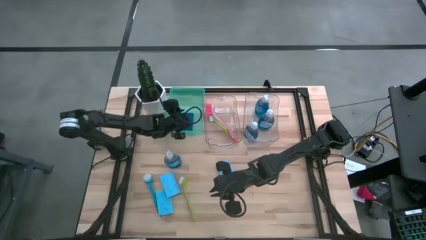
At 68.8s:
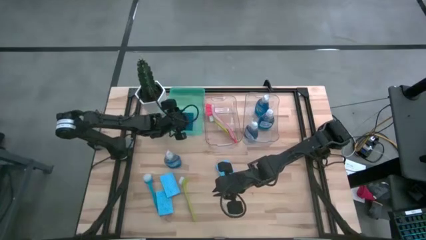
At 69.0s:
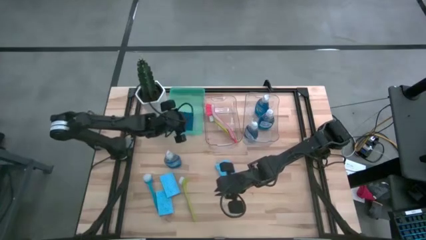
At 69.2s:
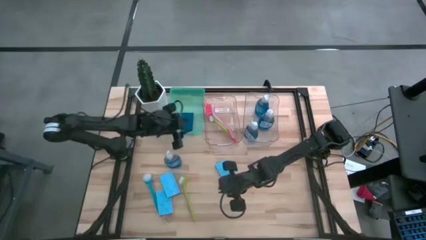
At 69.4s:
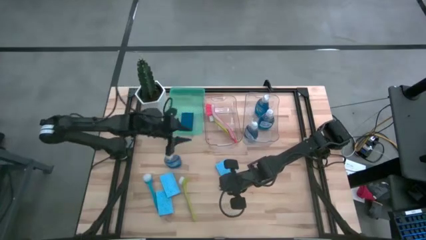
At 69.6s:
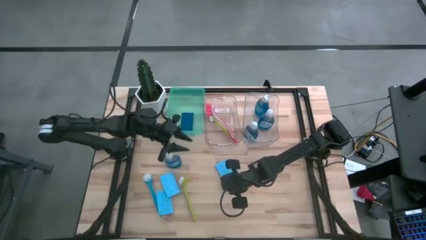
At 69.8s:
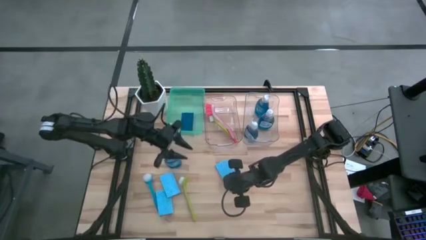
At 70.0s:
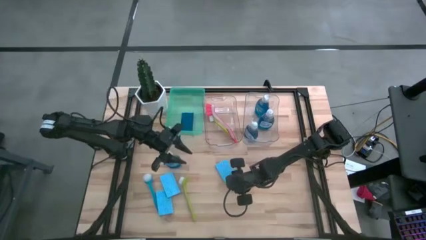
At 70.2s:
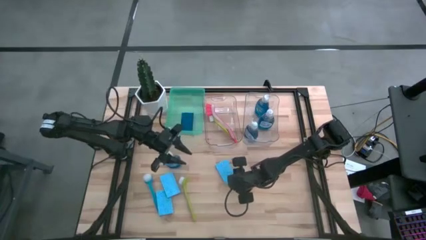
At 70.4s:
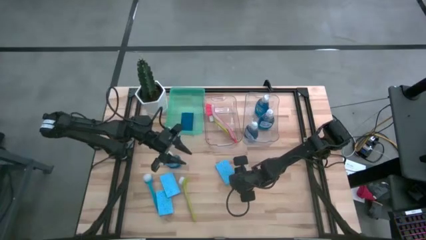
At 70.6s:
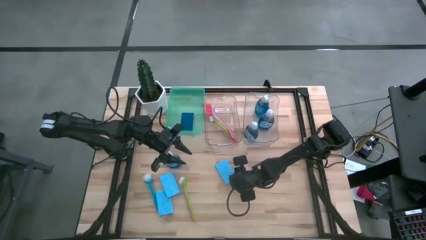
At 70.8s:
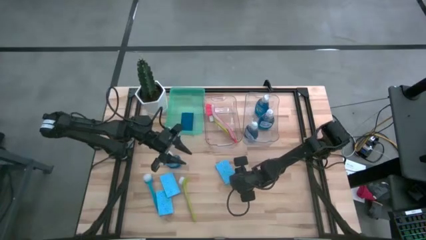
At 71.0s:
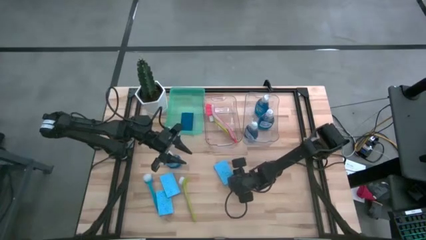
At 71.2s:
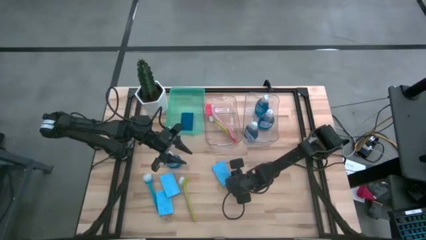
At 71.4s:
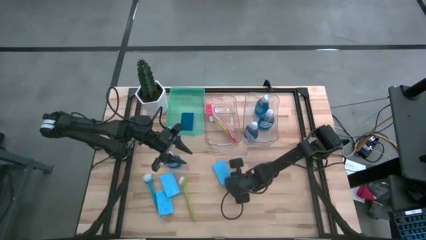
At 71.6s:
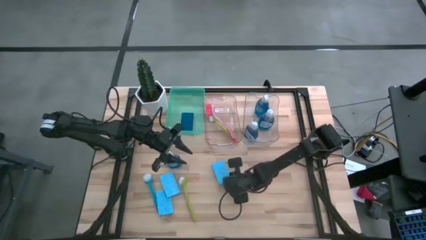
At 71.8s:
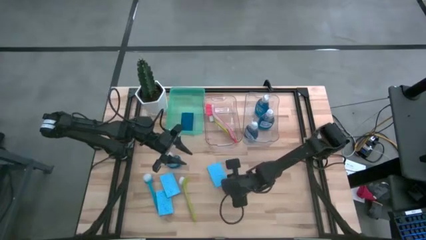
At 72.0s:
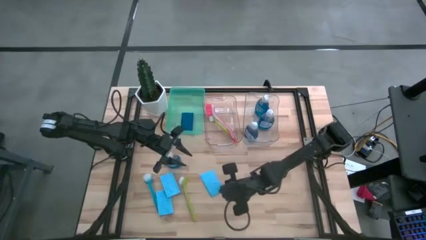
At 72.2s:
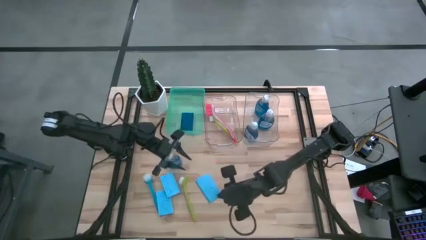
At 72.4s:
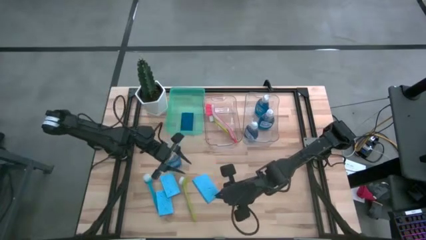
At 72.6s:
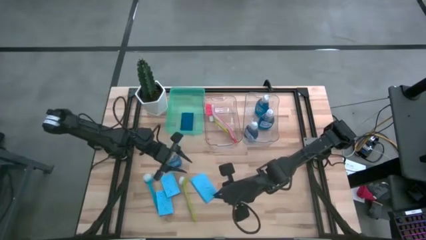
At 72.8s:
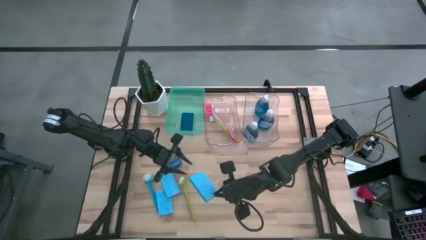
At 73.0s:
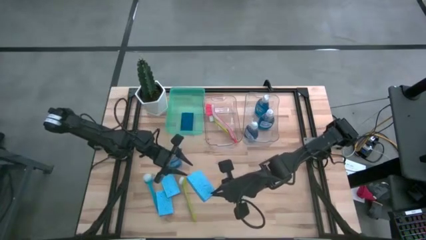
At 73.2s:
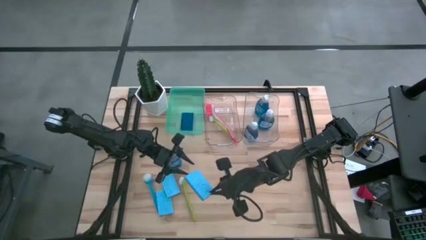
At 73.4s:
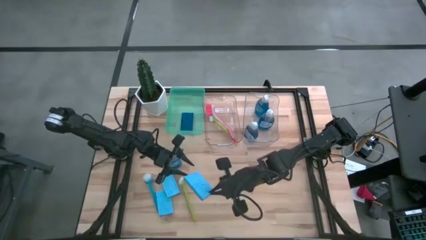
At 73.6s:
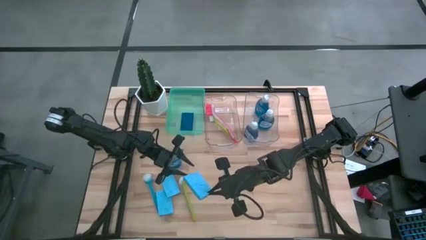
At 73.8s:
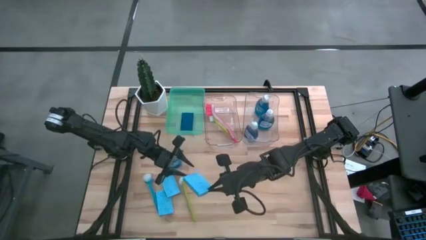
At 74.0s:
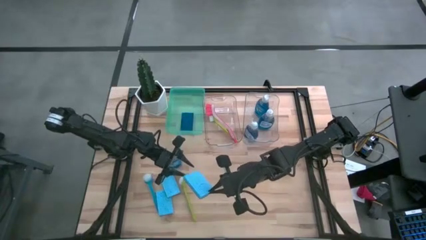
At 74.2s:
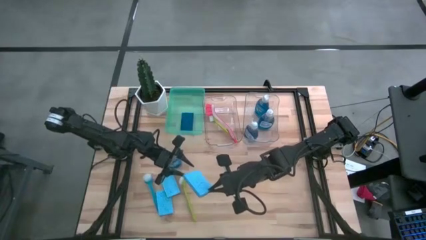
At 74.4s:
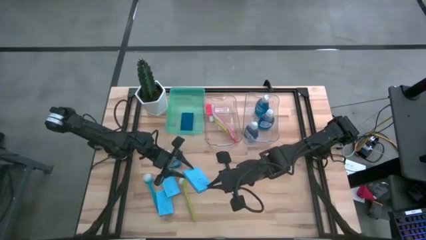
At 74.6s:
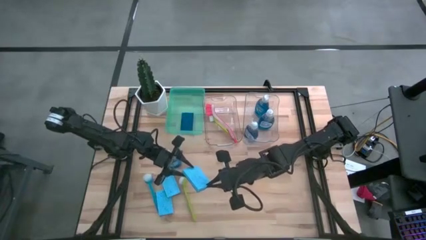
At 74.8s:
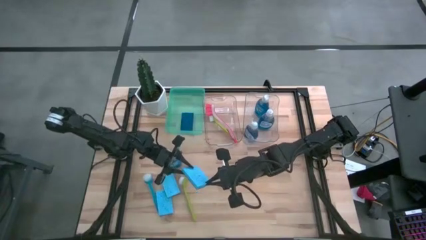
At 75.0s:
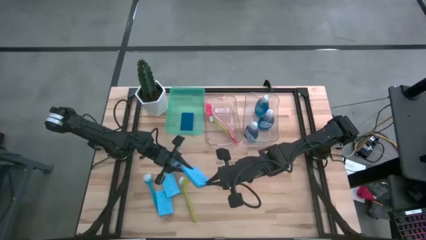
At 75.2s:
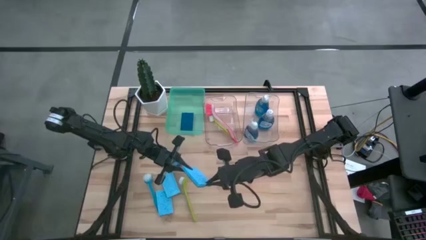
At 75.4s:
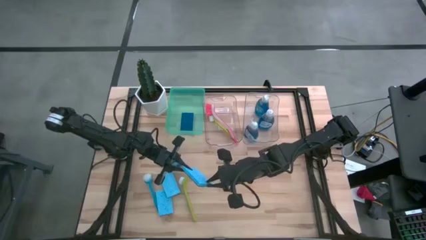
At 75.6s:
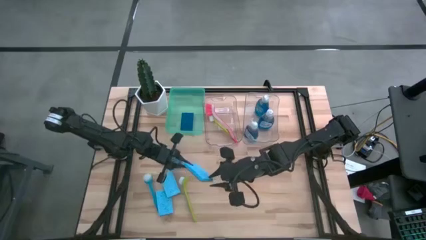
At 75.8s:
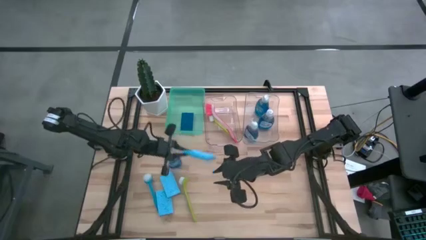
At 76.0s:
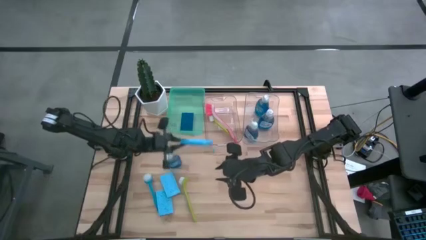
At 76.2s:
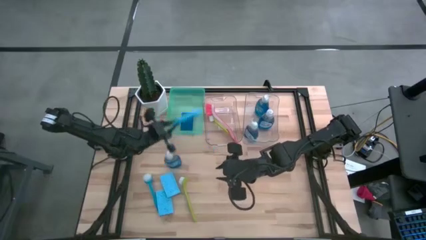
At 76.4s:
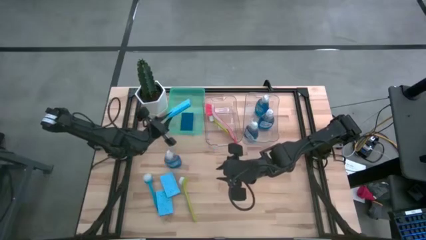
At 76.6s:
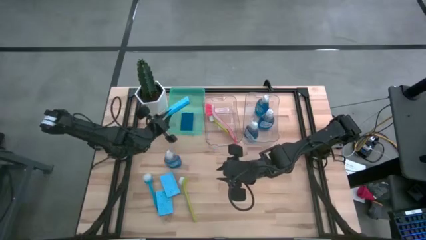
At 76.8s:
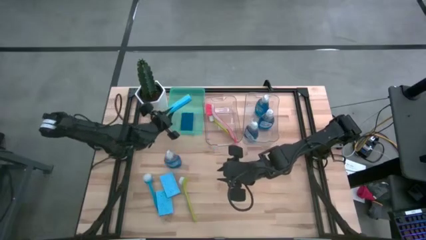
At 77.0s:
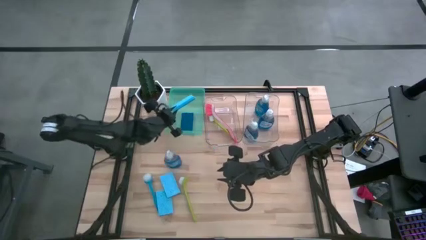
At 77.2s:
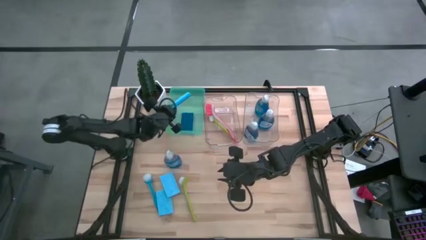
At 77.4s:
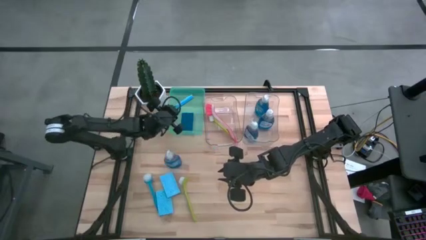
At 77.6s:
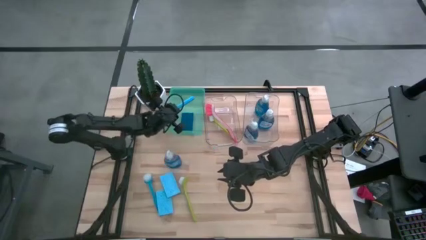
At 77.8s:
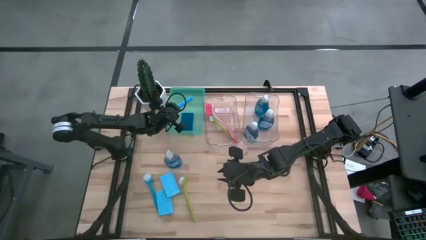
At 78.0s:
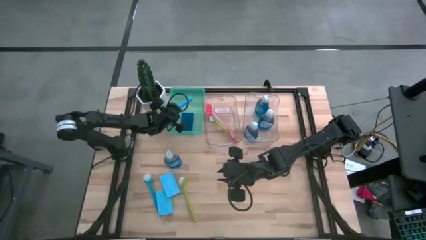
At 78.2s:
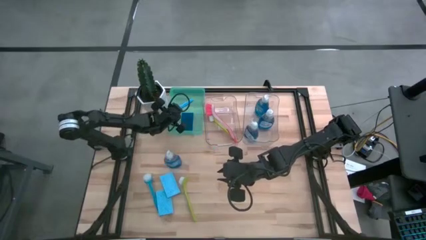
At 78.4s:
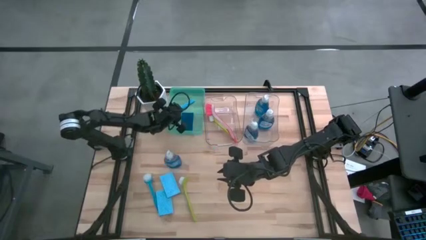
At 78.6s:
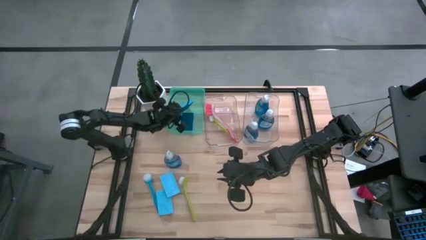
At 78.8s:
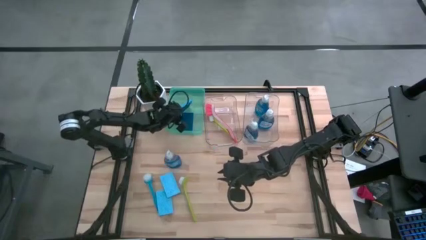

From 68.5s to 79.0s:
Task: Pick & Place Kitchen Sink Supplies
Put the blue sponge into the green bin

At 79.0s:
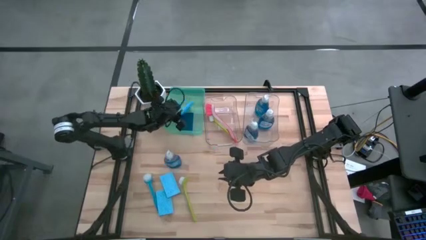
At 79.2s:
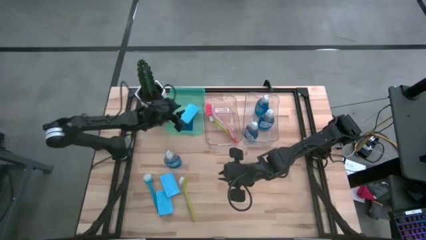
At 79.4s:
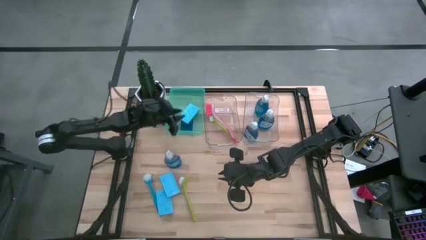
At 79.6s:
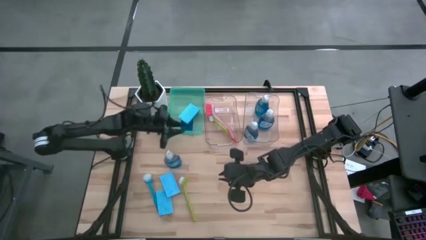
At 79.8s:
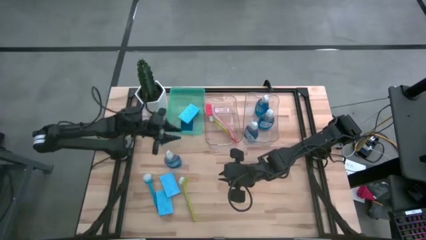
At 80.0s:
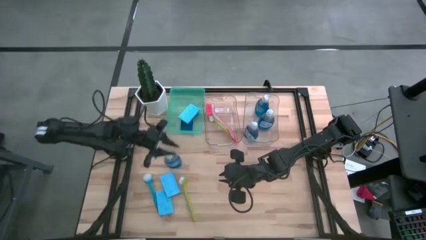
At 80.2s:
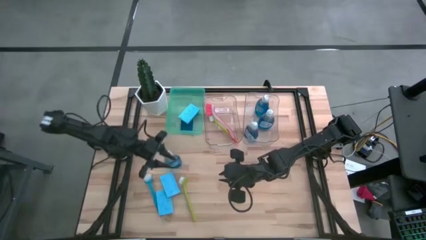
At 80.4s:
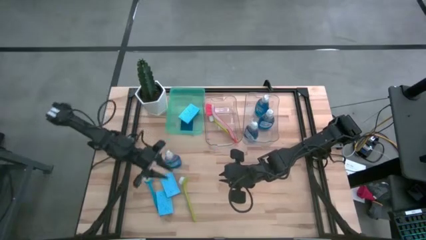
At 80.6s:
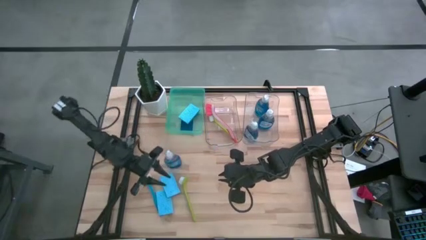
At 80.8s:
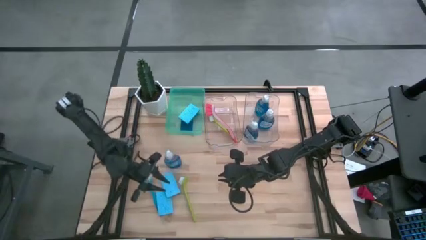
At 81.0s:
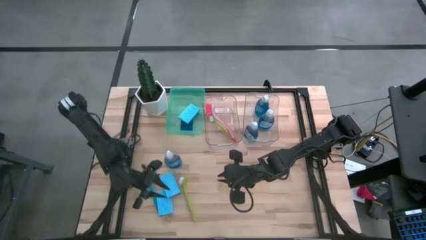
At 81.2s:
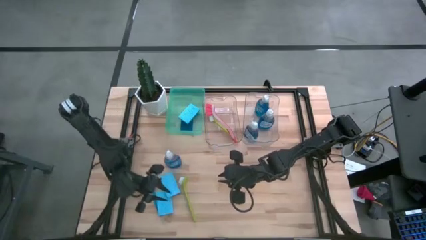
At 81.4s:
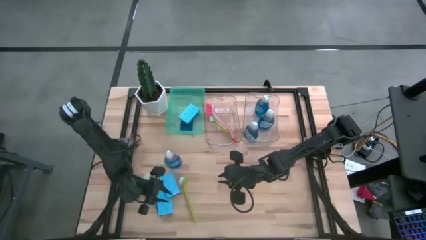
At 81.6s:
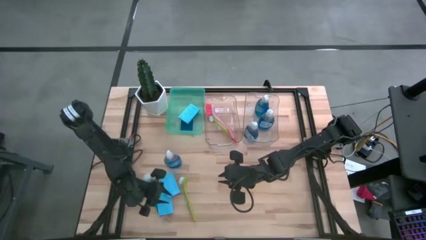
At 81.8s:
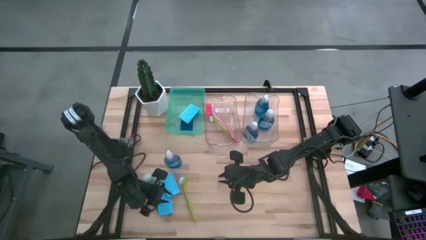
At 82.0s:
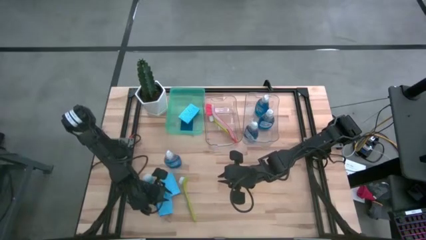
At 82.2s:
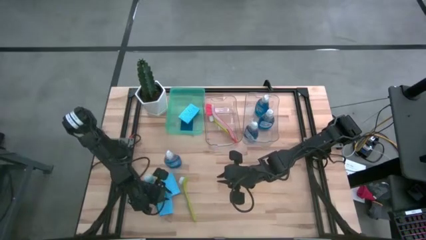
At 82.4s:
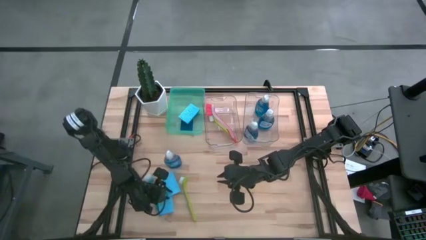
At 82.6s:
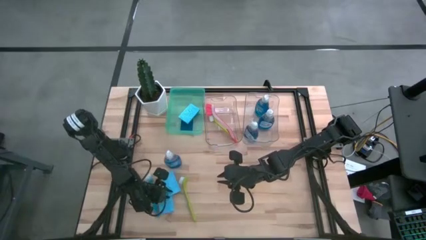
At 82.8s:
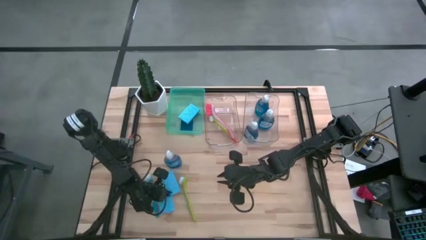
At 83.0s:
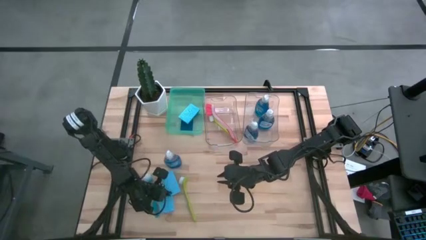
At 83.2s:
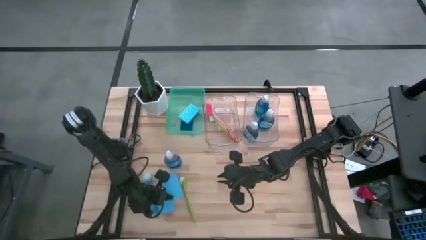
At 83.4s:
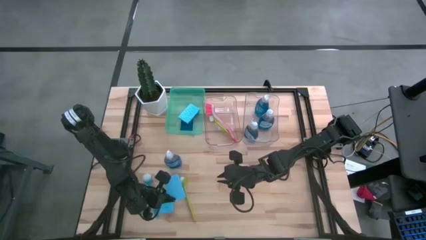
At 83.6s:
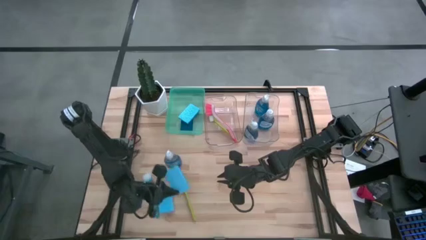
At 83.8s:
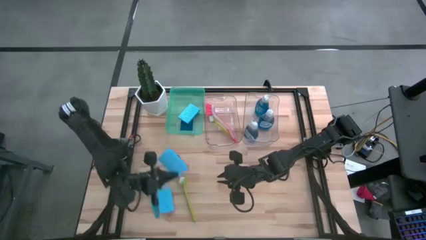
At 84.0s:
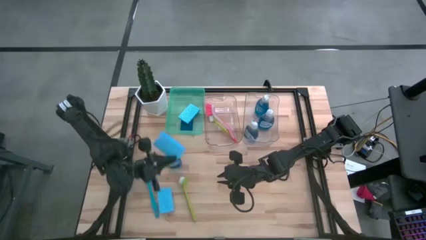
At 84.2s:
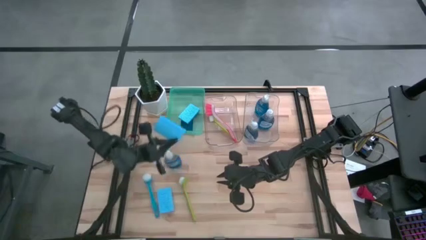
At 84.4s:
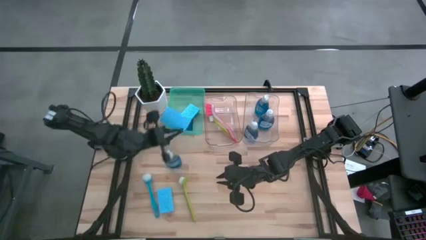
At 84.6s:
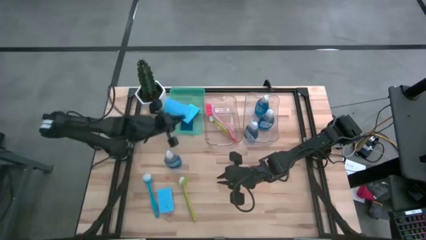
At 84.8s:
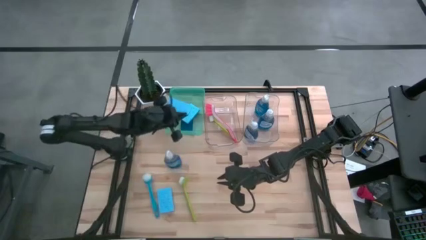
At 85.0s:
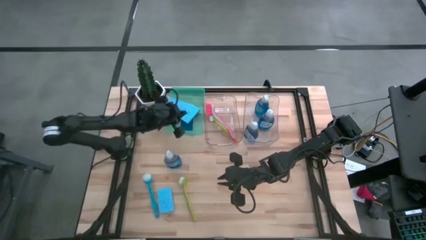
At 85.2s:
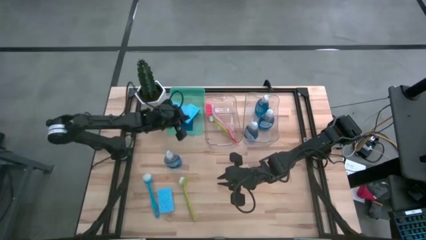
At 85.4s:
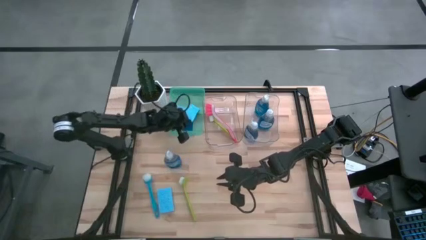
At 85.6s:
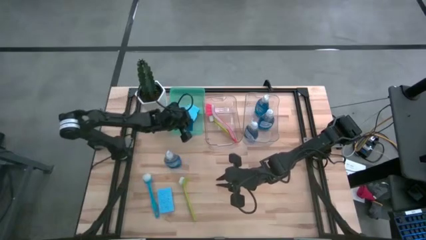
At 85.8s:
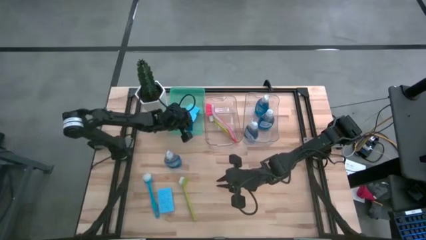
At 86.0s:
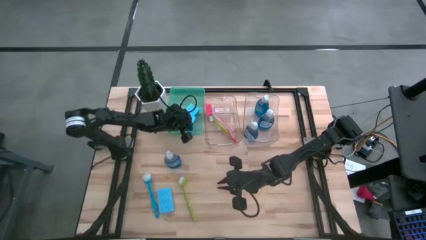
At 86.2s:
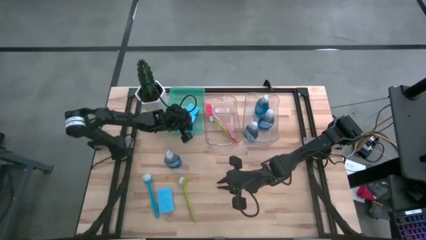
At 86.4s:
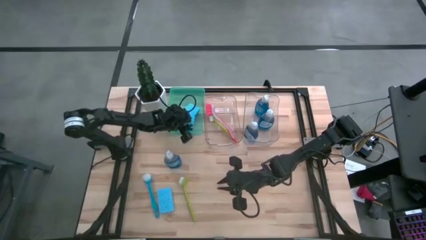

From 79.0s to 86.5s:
Put the blue sponge into the green bin
